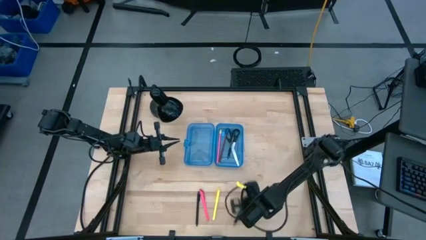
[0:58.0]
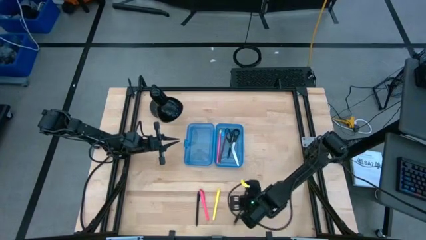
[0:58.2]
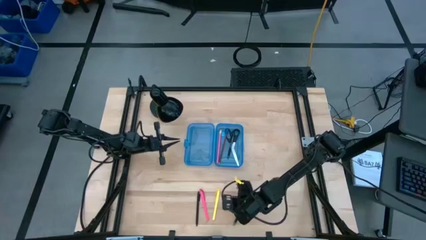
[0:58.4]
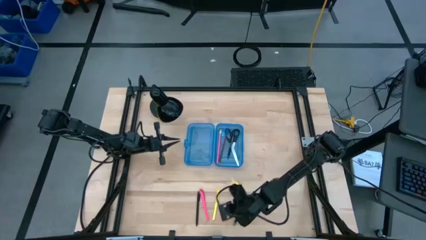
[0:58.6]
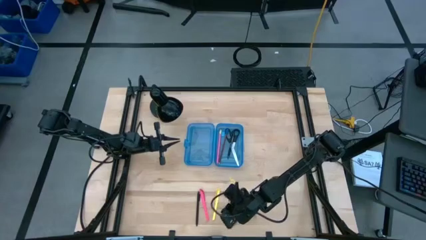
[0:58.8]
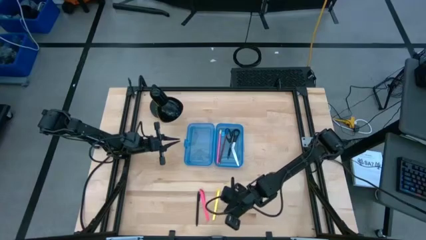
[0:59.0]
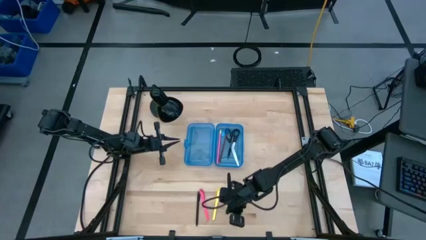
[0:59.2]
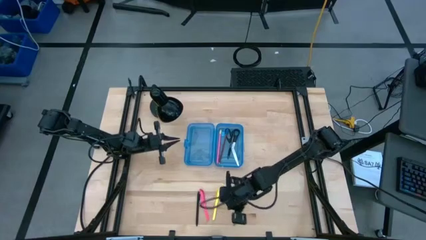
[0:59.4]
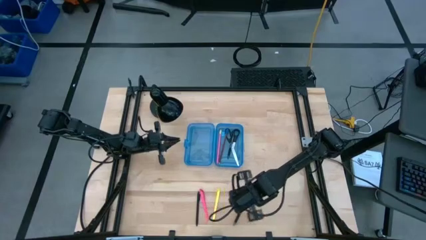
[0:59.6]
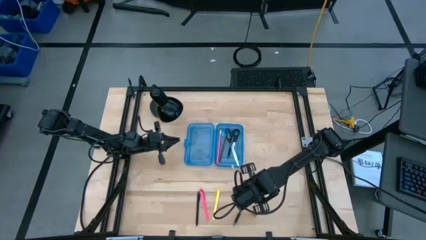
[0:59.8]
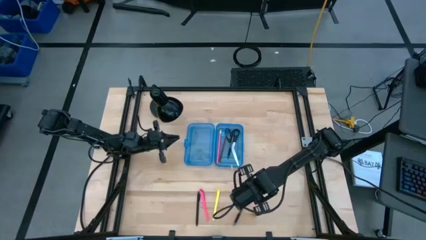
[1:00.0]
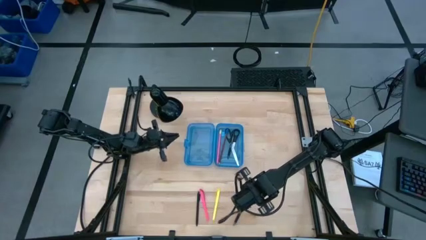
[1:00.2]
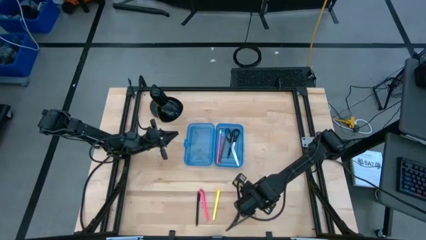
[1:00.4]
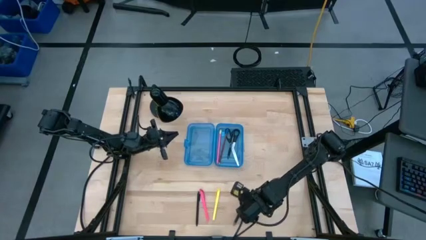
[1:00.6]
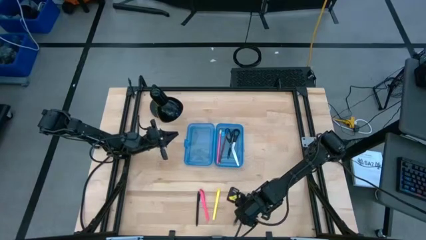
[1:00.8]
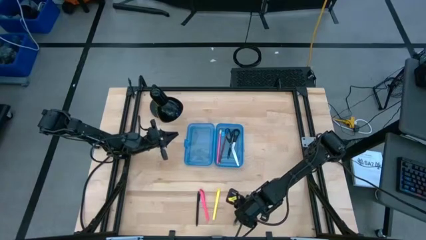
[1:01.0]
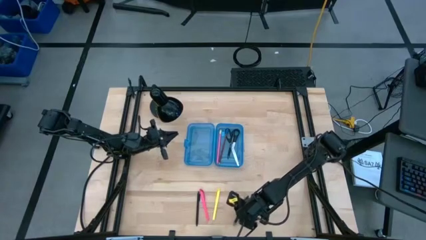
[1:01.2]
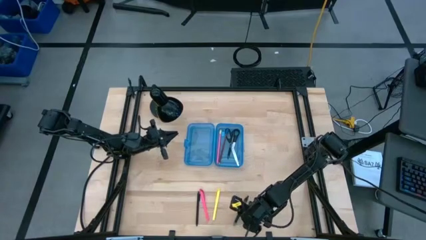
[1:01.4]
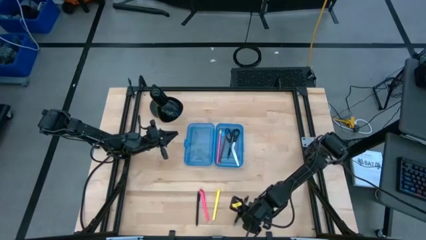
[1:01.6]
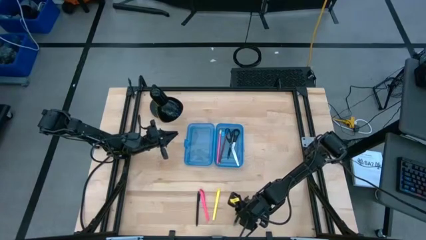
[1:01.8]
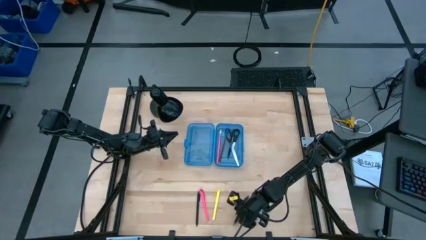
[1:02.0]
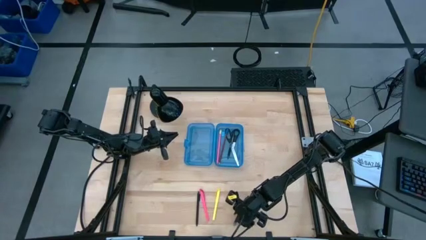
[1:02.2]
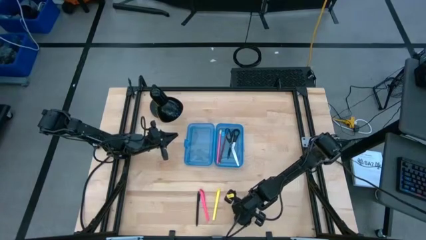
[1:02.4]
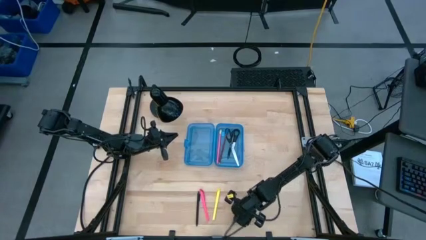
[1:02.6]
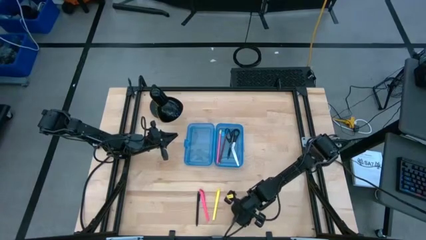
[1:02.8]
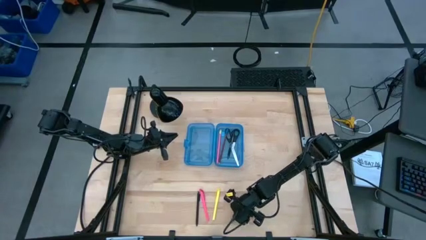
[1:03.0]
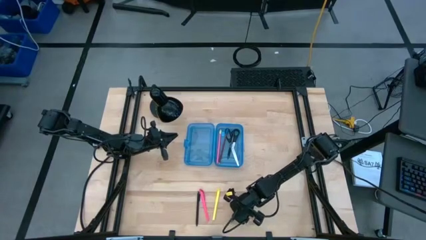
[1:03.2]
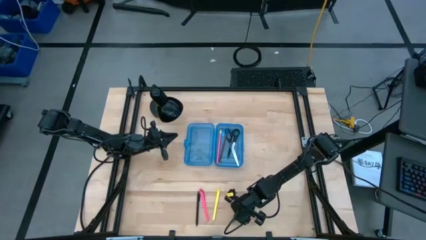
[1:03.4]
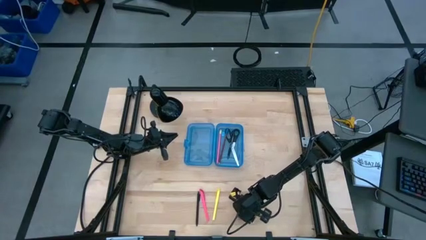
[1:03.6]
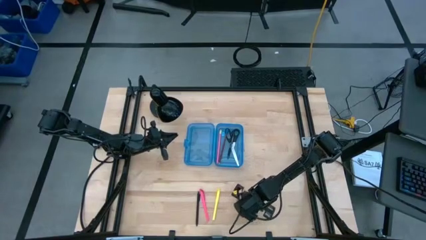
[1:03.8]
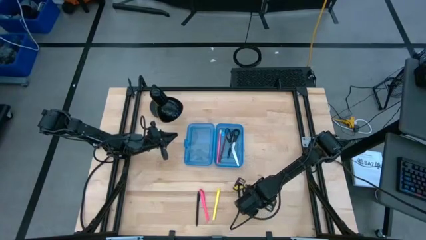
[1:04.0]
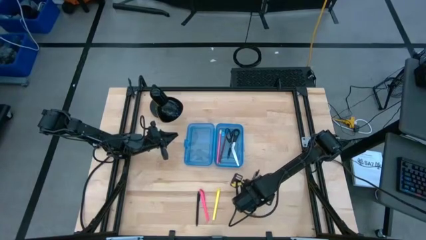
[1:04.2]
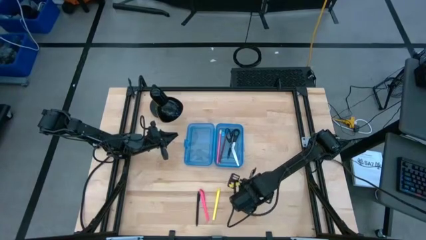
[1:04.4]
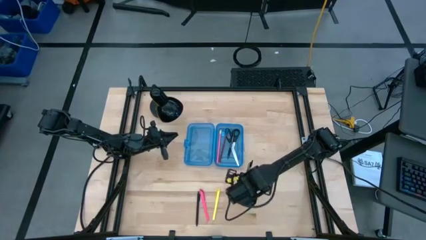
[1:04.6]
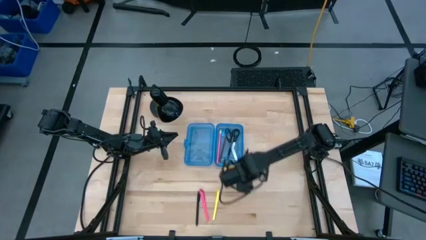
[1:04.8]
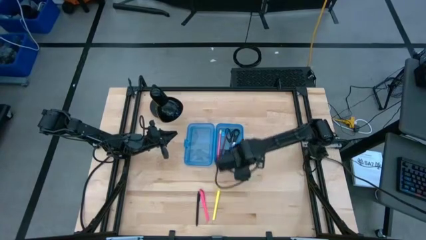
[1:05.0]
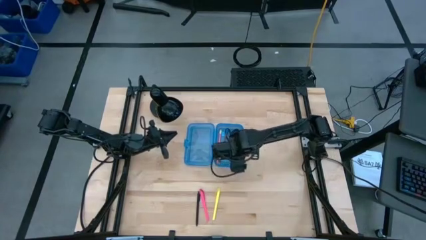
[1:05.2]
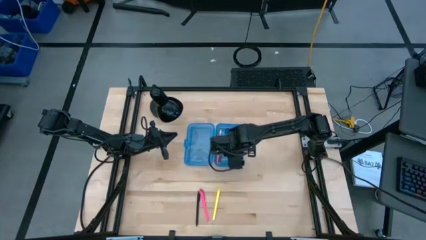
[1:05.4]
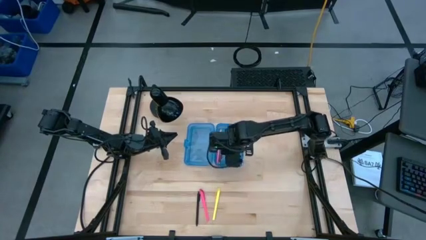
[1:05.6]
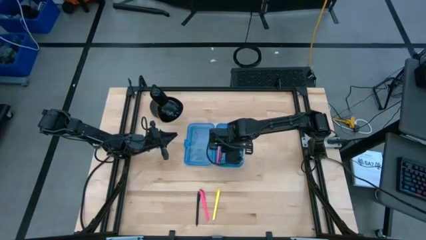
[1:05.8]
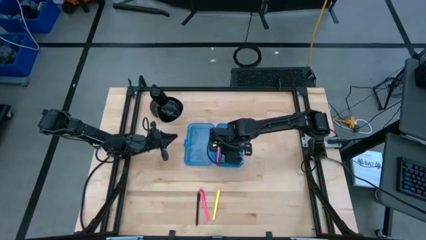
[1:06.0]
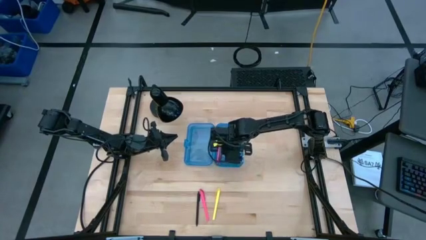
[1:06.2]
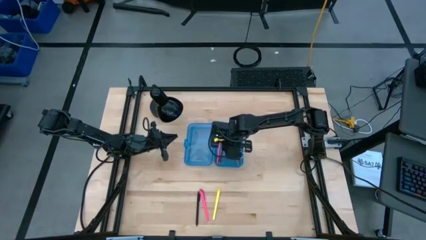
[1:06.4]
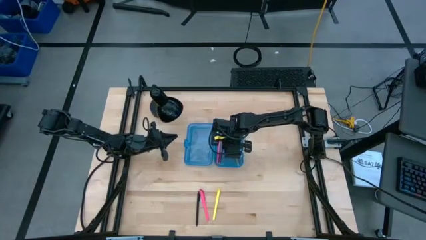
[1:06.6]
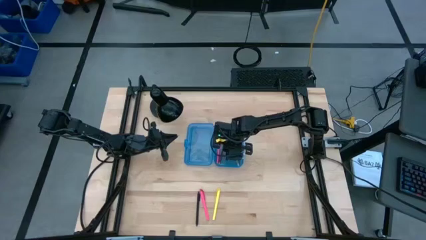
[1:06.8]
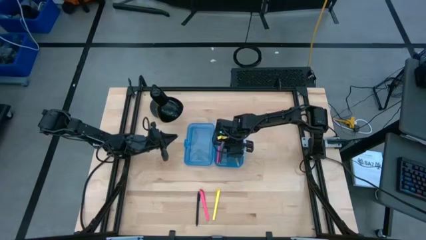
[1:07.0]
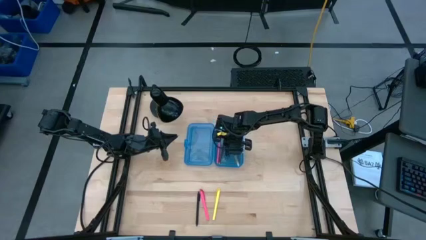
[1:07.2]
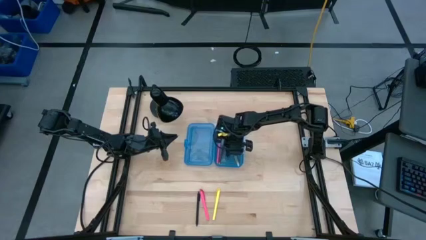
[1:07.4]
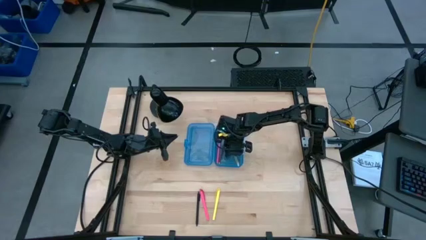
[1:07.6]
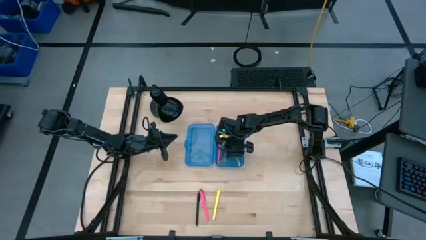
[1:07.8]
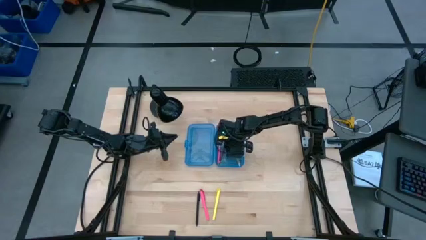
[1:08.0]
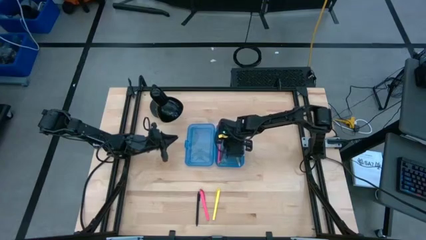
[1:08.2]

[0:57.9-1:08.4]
Task: Pick & place school supplies into a supply box
Put the right black pen into the supply box

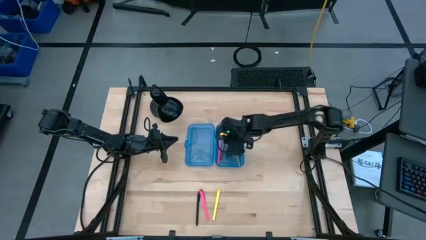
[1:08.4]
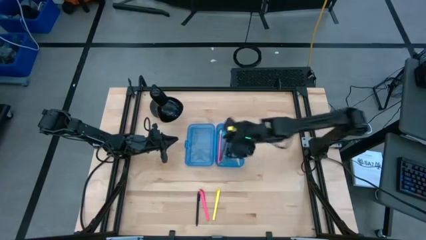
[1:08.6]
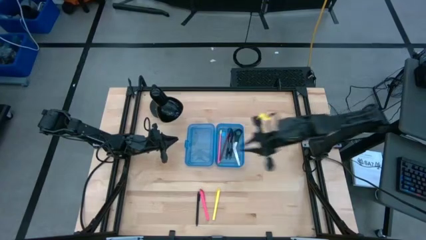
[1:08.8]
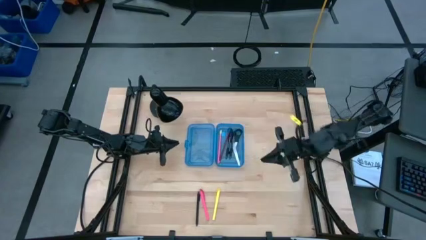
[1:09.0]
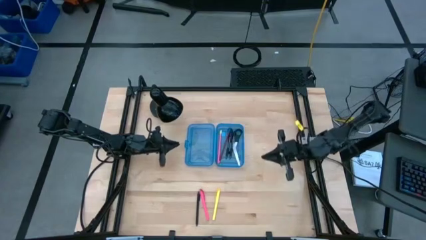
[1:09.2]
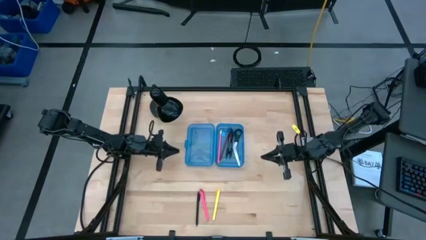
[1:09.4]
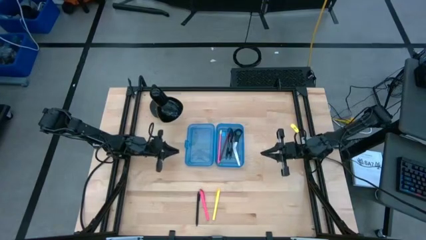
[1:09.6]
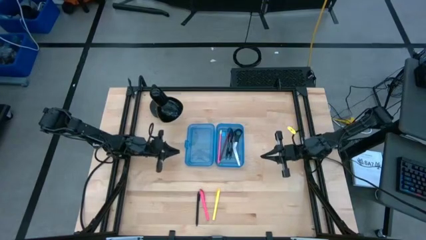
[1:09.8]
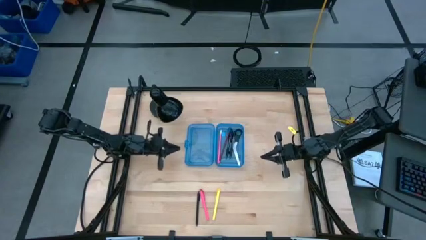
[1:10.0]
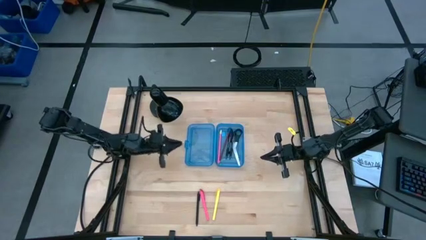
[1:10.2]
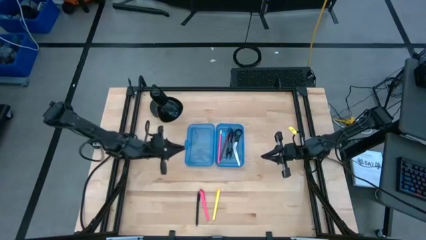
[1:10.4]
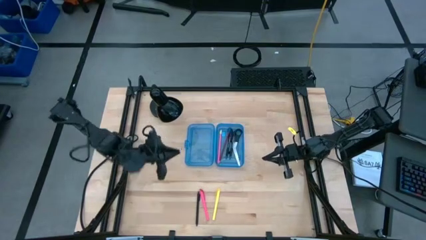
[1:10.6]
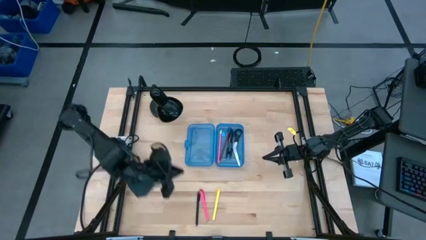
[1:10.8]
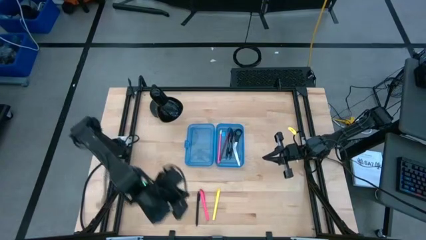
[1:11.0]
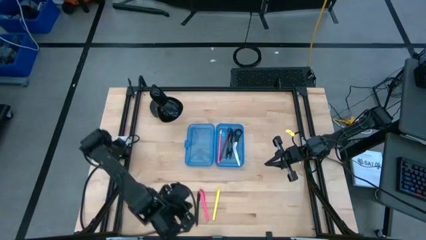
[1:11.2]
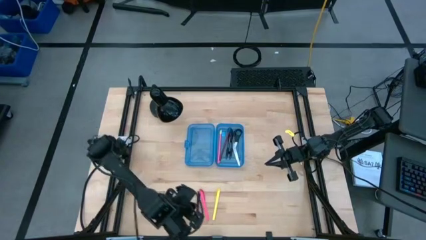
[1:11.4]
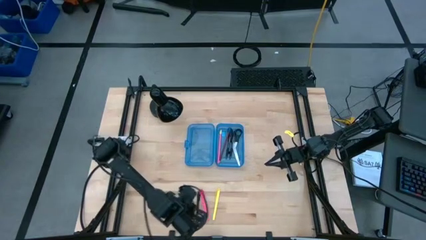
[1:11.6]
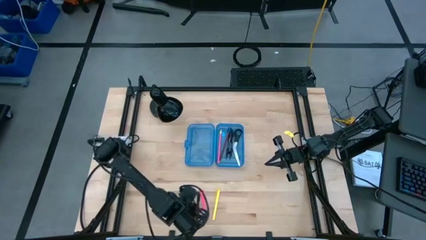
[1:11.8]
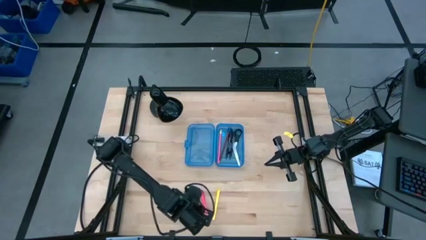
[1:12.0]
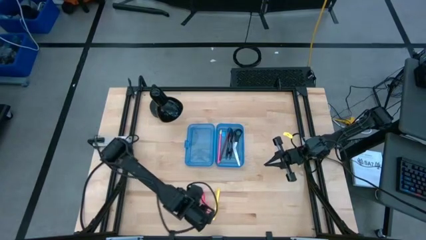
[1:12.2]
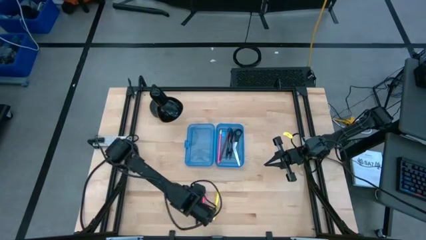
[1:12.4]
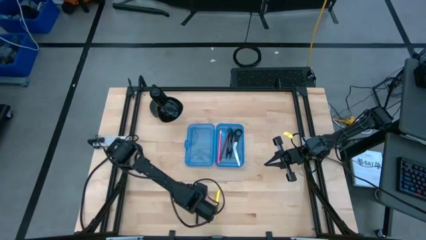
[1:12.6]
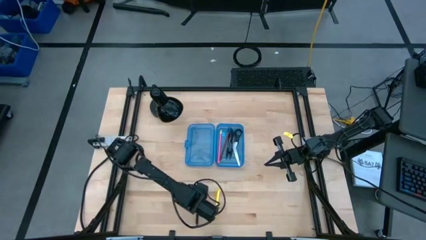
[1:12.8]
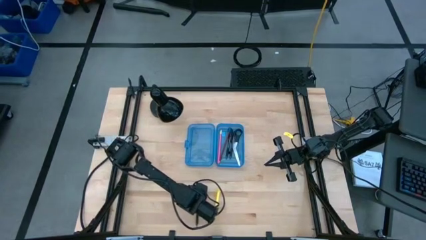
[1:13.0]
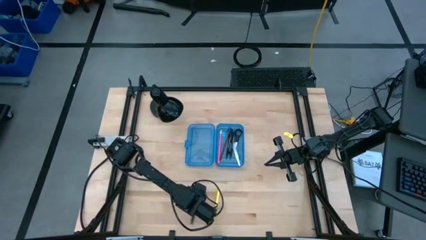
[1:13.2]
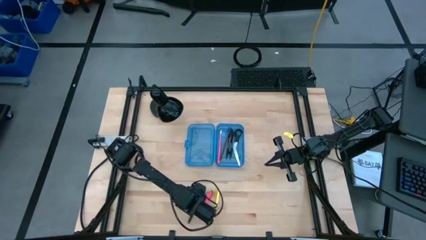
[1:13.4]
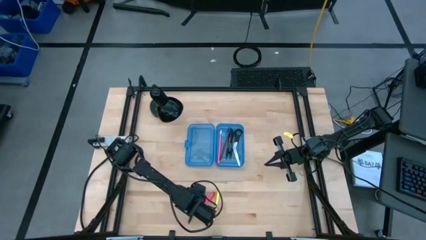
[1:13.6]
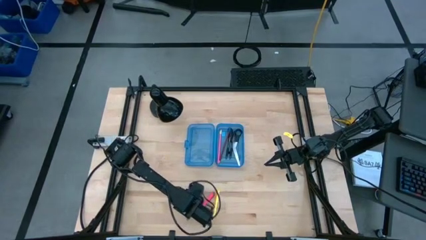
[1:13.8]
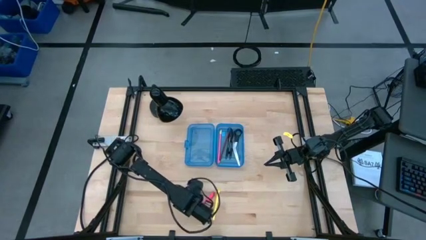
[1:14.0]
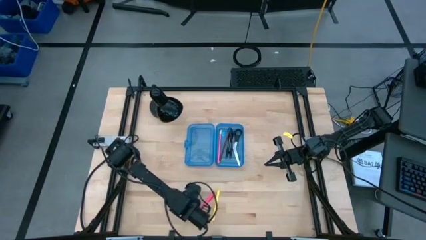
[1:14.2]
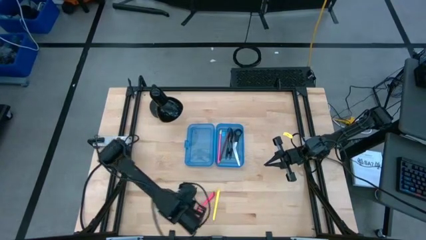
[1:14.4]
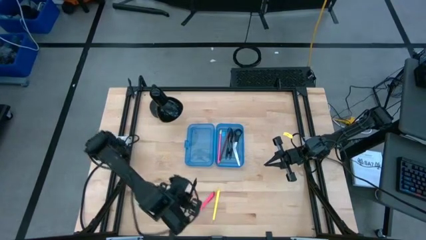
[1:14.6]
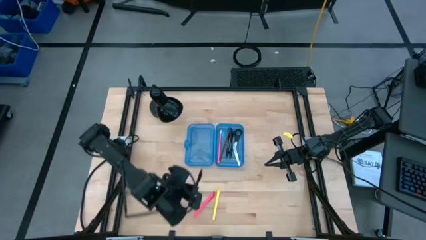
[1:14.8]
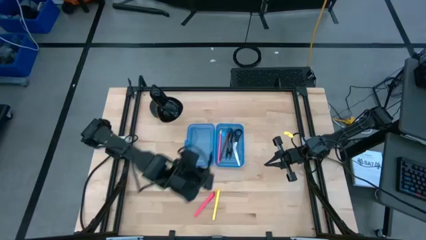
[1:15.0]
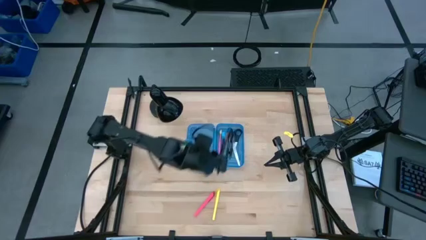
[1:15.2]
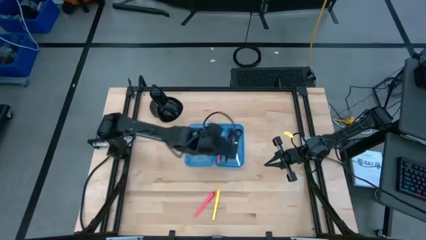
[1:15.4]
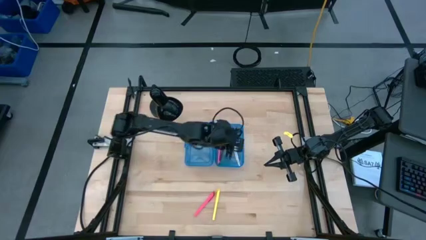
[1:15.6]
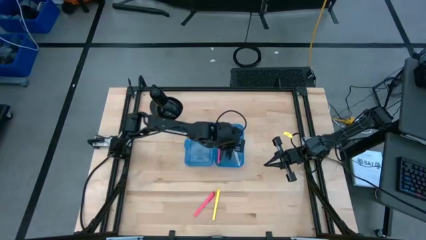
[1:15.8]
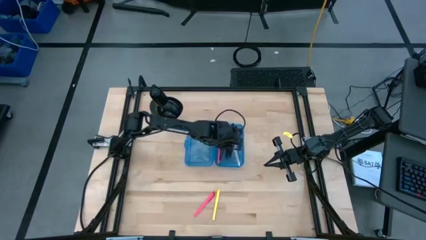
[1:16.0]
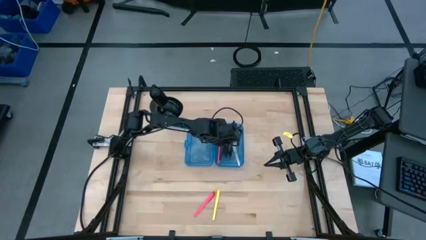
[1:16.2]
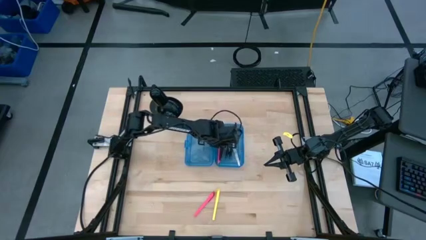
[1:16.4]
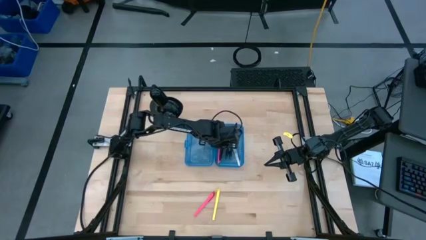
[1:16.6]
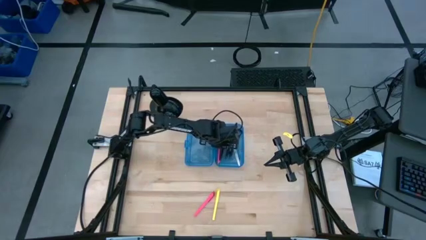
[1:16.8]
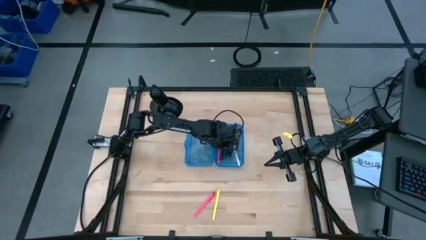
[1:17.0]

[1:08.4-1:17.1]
Put the black pen into the supply box
